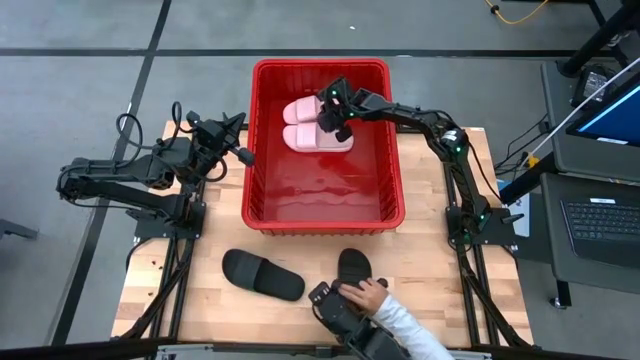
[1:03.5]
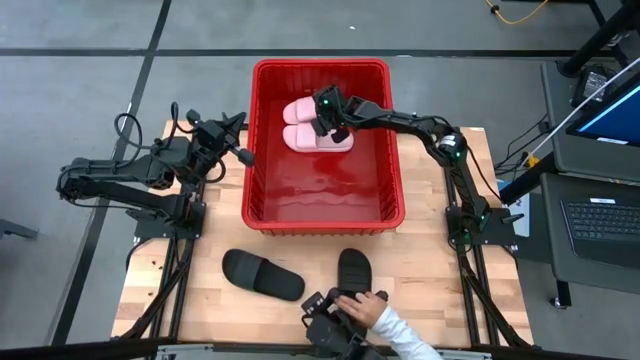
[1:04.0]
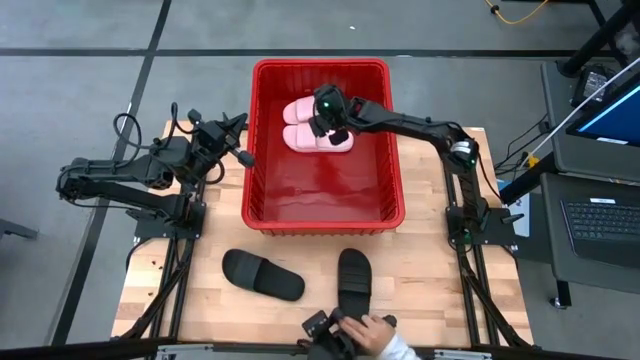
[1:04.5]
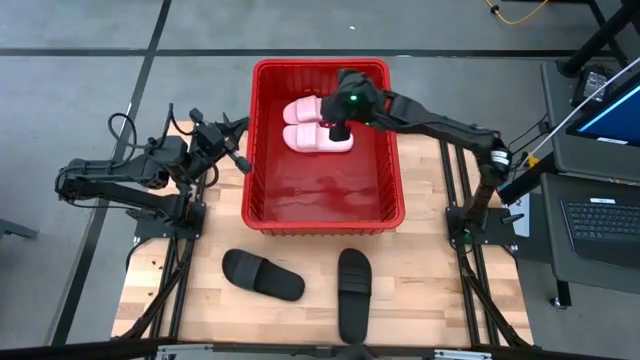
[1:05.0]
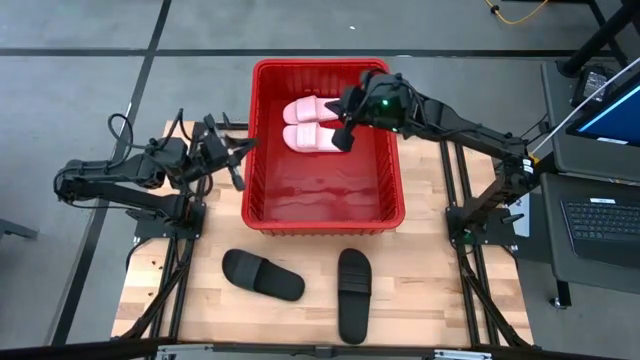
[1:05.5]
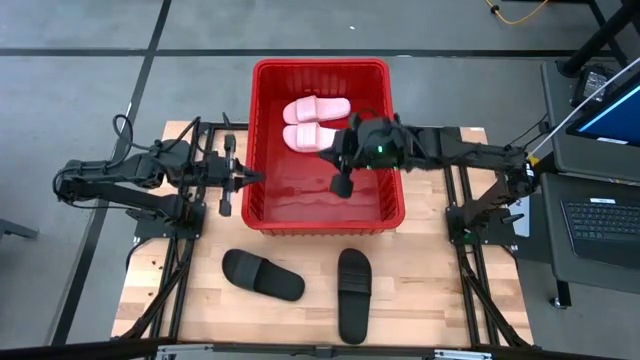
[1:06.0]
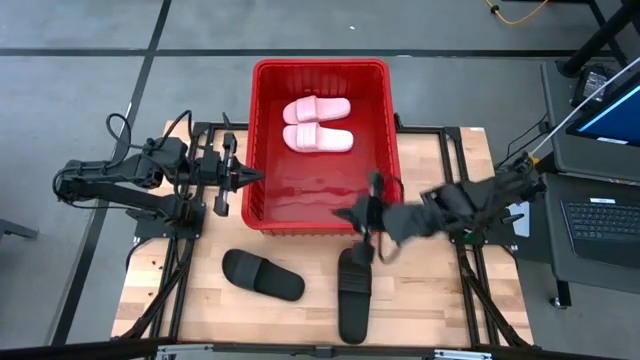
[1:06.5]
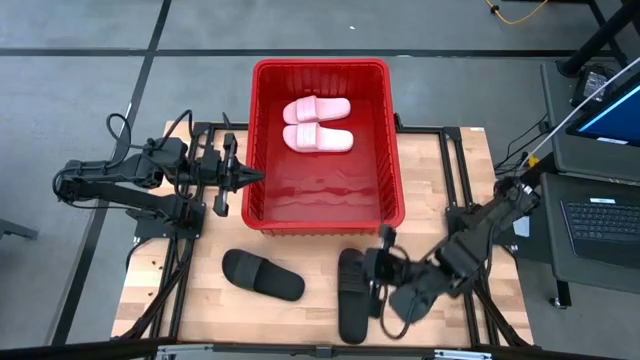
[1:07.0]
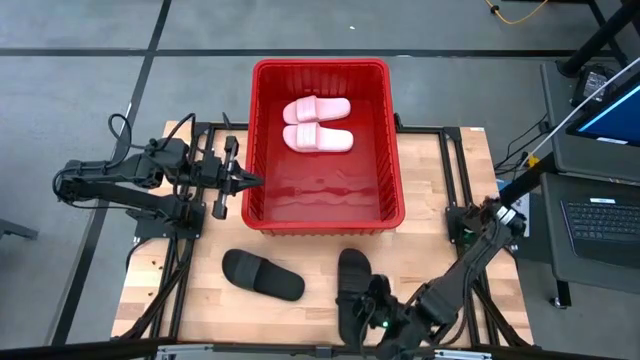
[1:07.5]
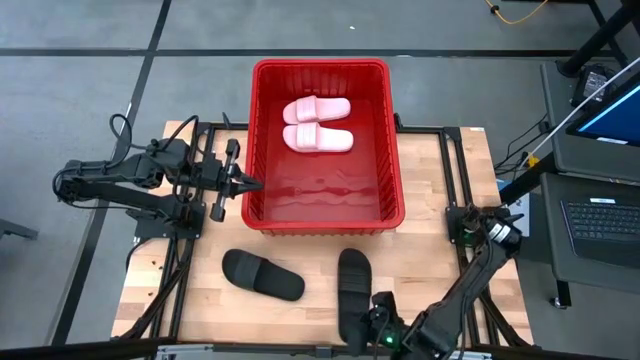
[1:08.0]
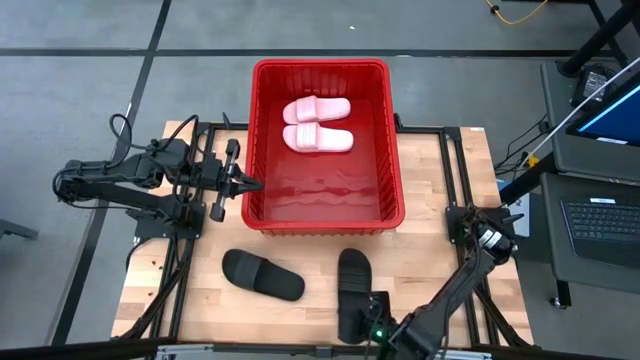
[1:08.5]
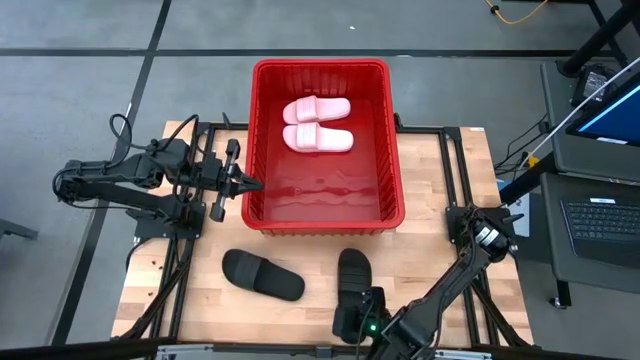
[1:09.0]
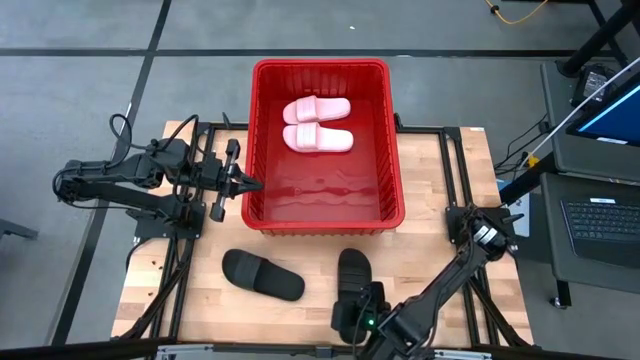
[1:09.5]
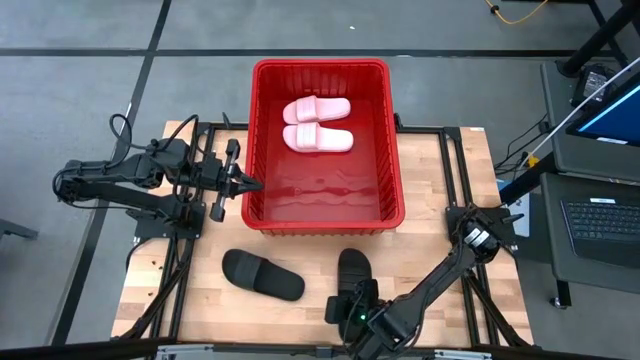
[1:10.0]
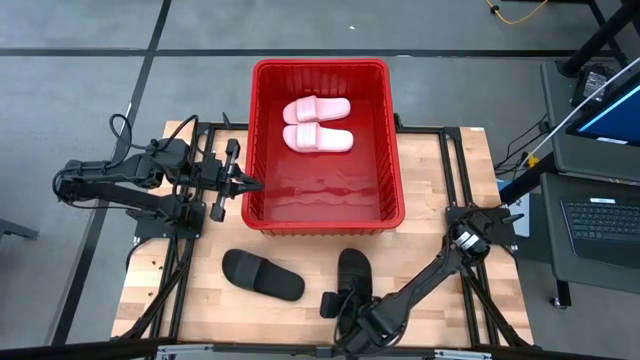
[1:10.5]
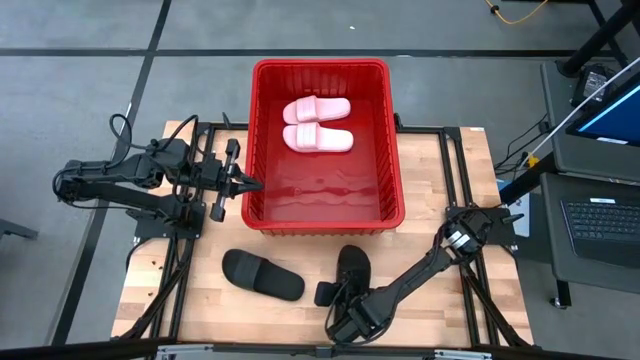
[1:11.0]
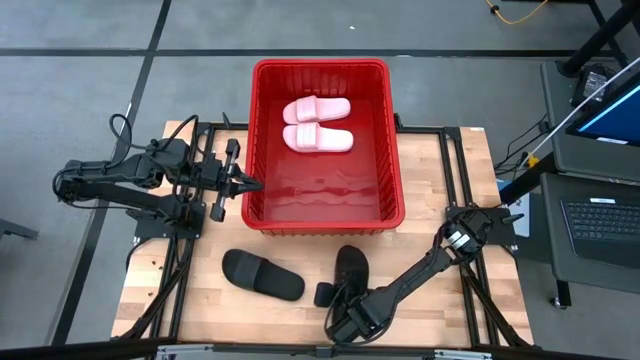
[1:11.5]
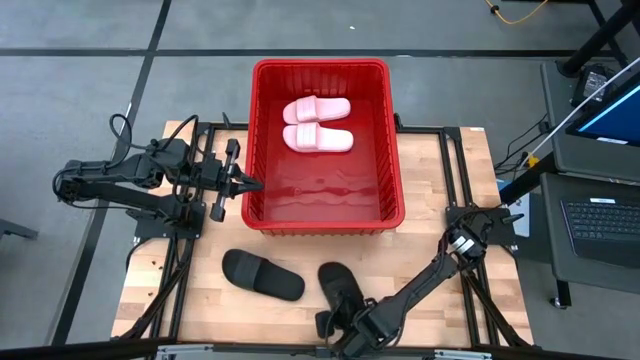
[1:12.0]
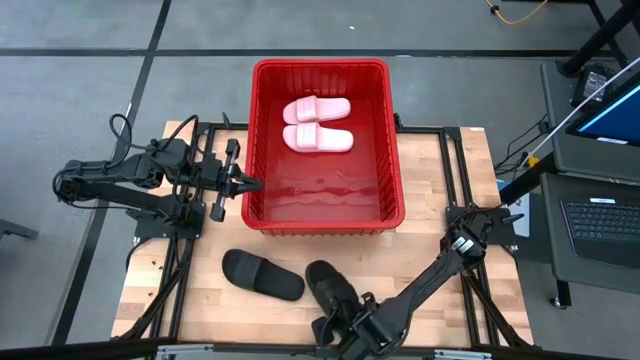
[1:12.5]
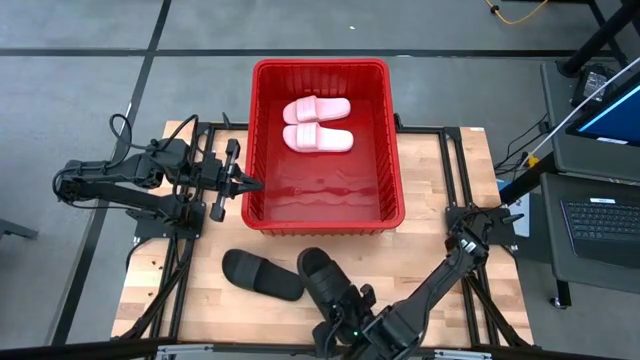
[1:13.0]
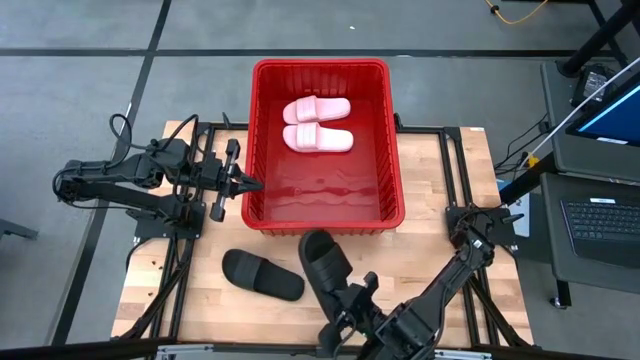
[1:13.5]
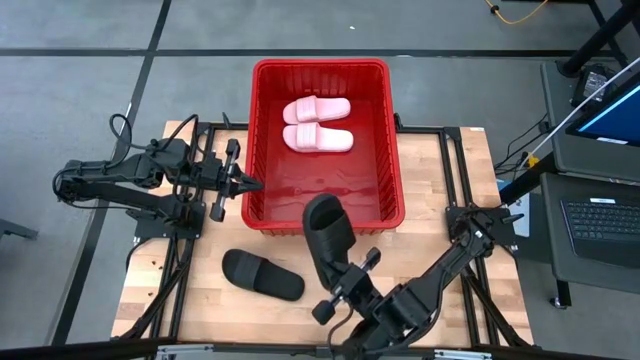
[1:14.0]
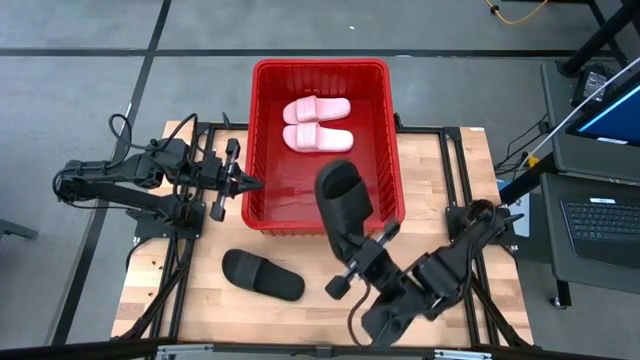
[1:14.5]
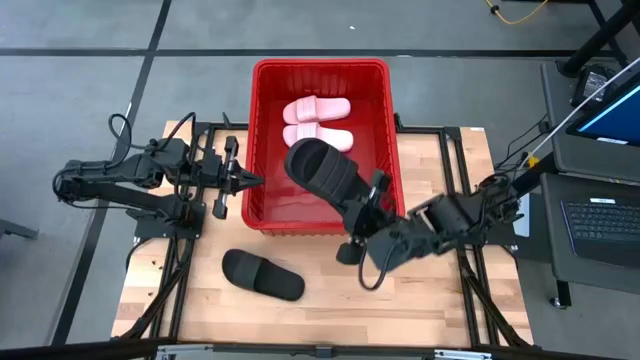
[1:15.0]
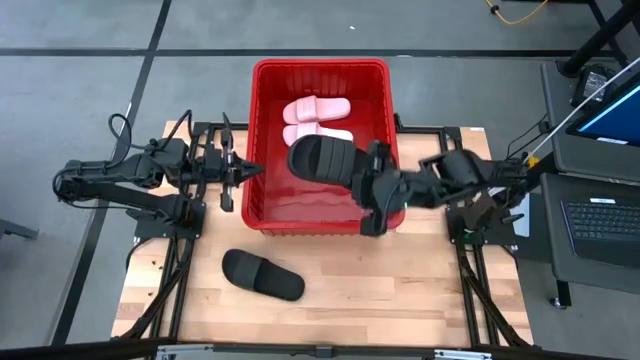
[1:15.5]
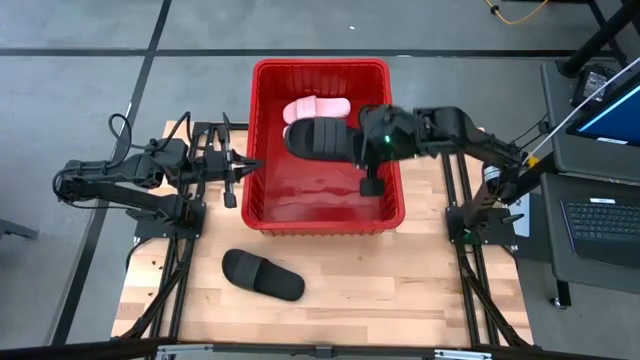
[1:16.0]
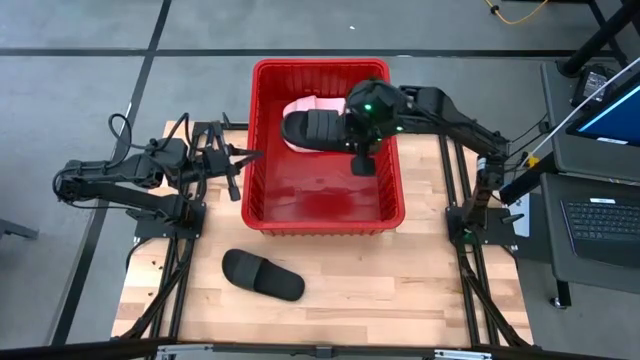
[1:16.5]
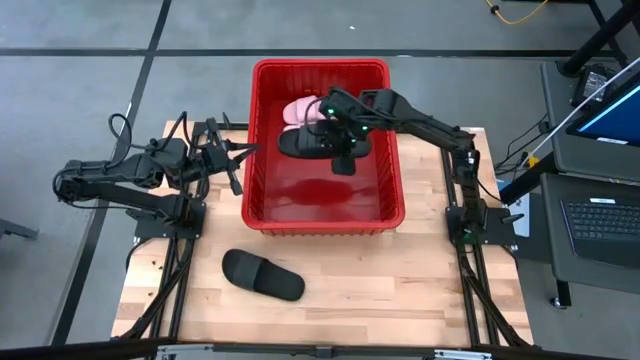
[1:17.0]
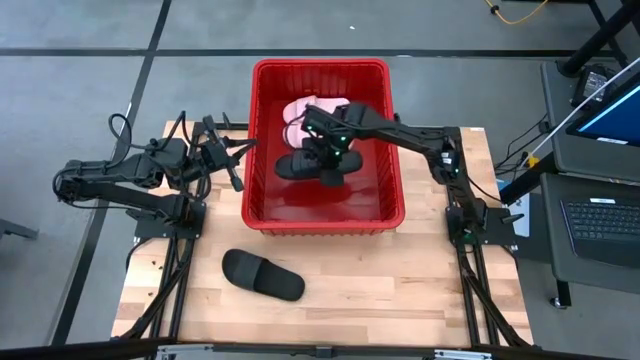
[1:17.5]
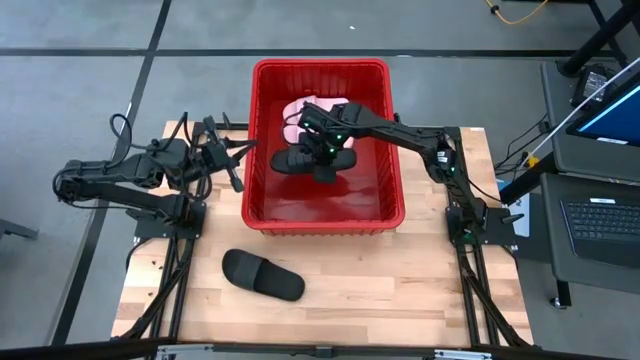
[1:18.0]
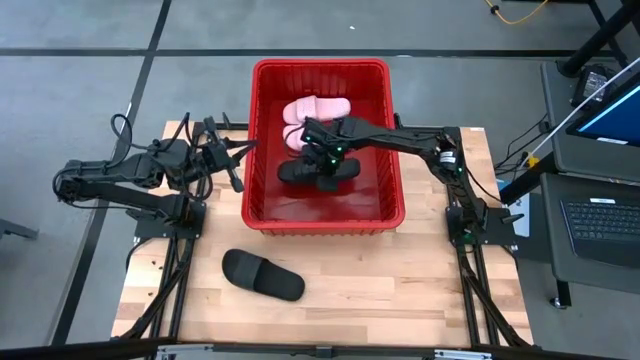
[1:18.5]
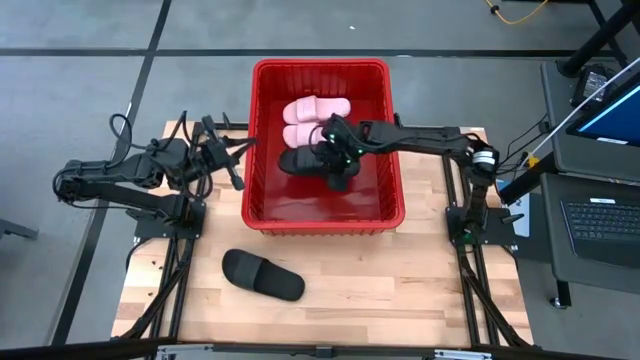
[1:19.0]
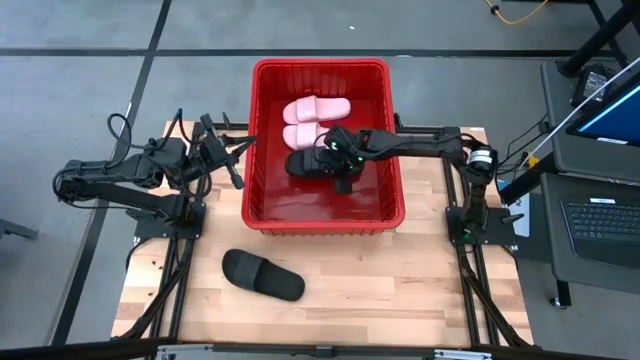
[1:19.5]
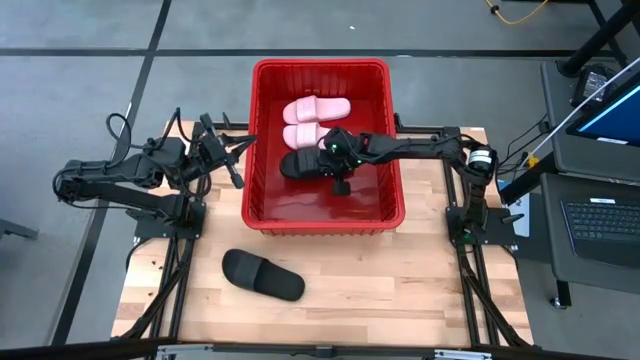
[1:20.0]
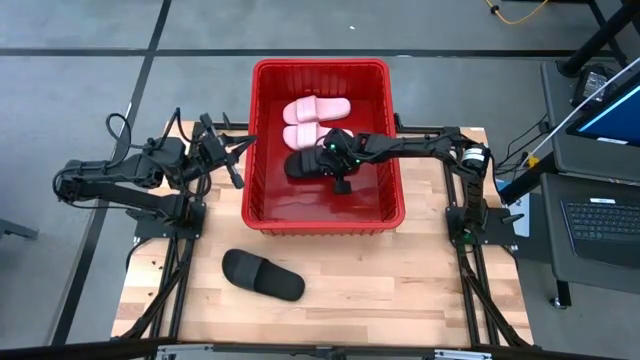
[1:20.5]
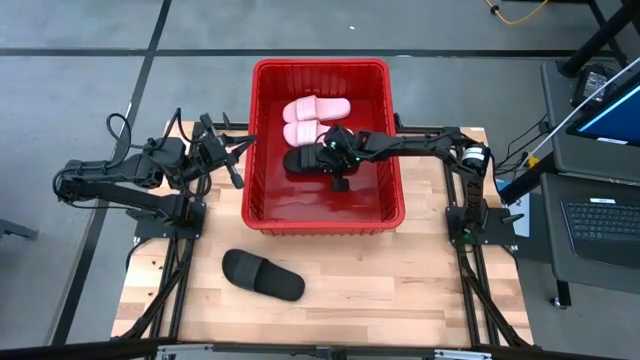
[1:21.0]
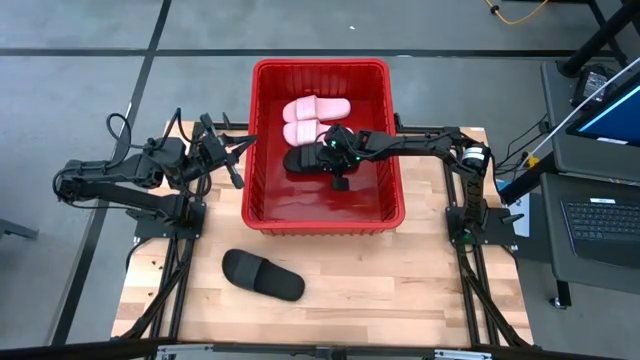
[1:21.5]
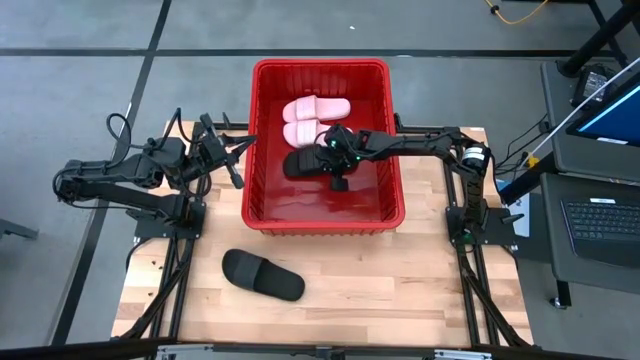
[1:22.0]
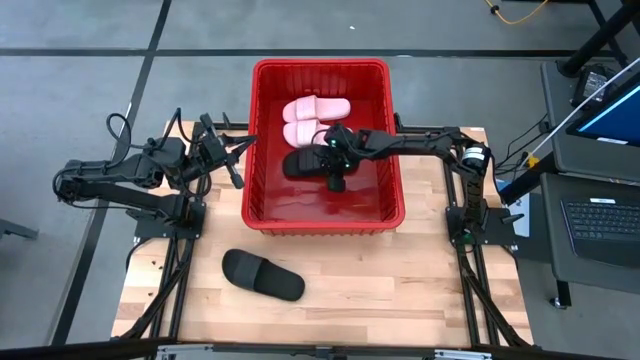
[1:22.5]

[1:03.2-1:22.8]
Task: Pick and place slides into bin
Put the right black slide into the bin

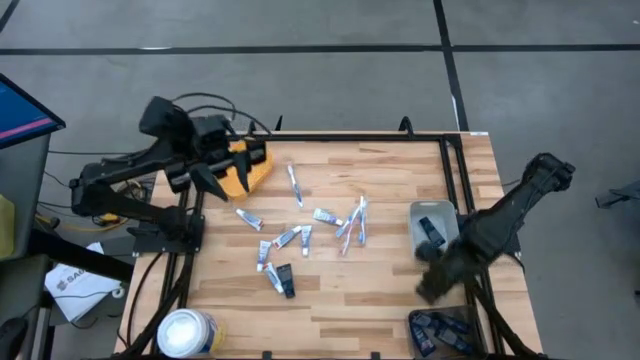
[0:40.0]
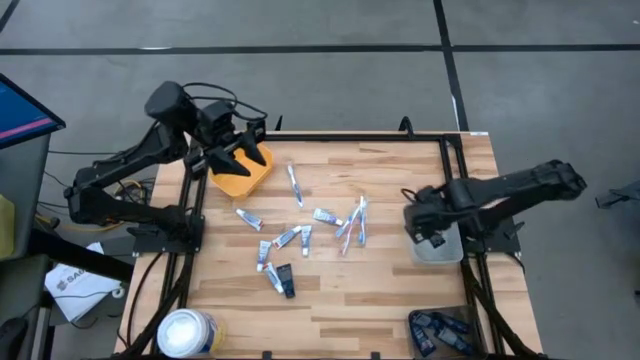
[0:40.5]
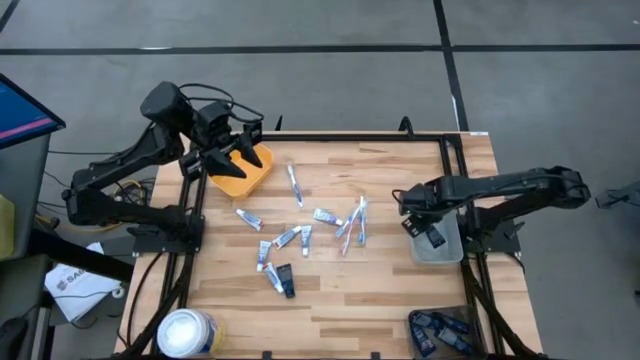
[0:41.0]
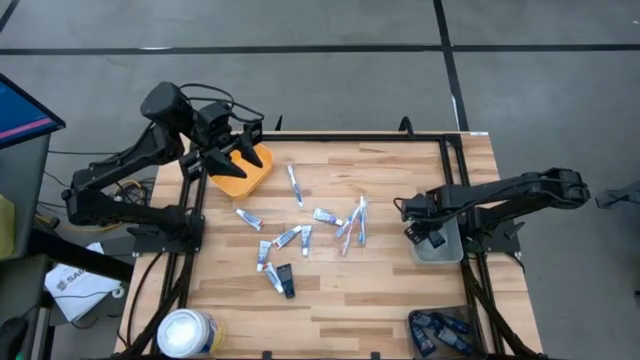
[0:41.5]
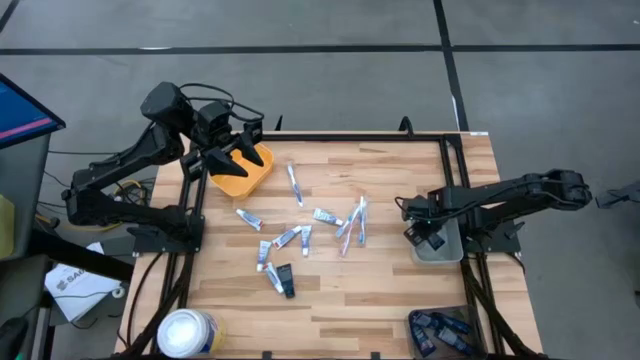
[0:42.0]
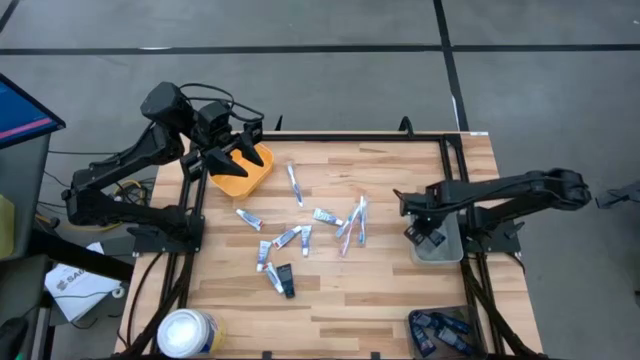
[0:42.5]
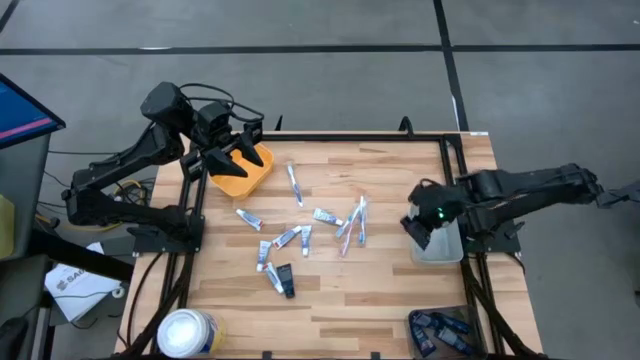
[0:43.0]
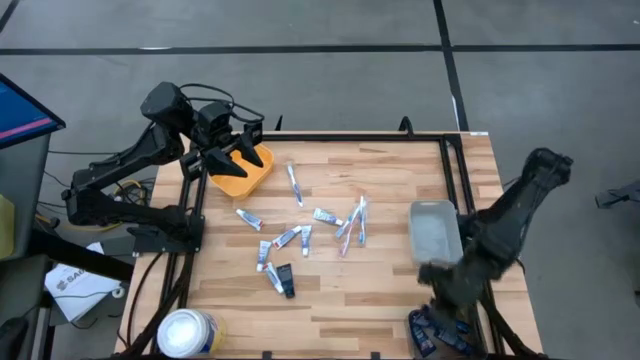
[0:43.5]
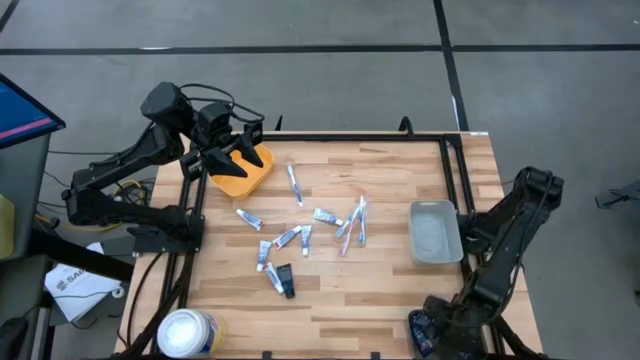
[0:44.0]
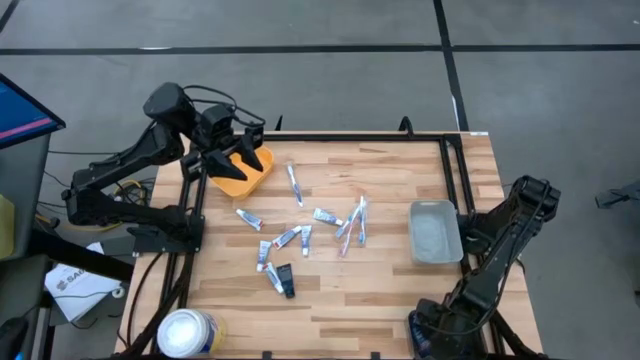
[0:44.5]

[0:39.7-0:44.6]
Task: Pick & Place Travel size toiletries
Put the blue shave cream into the black bin
